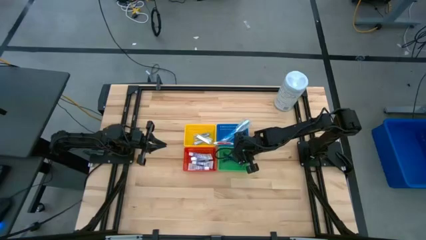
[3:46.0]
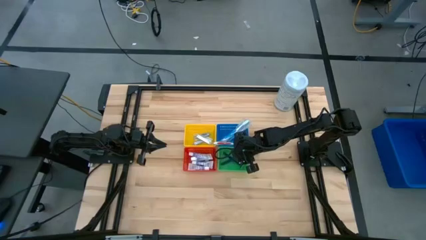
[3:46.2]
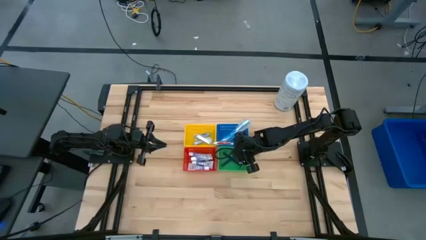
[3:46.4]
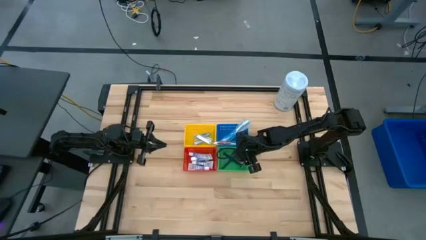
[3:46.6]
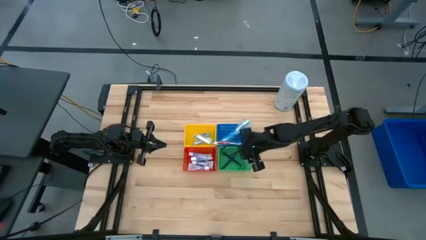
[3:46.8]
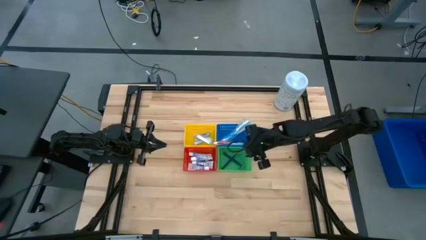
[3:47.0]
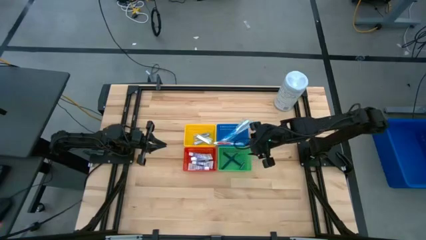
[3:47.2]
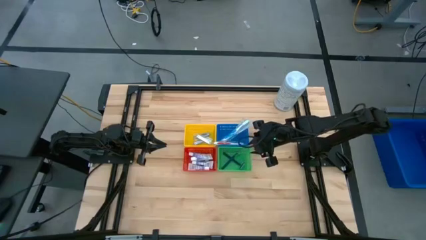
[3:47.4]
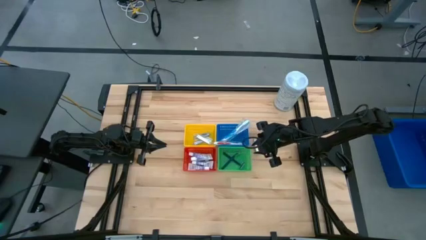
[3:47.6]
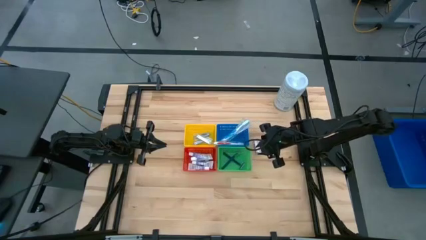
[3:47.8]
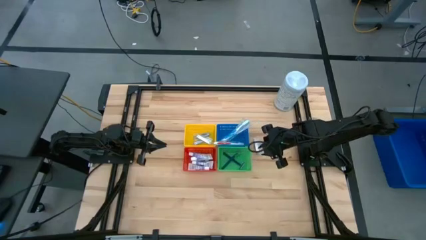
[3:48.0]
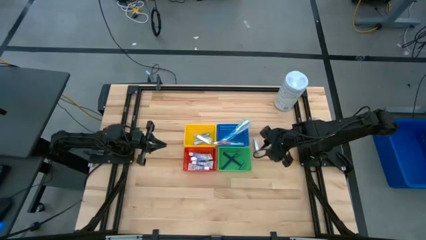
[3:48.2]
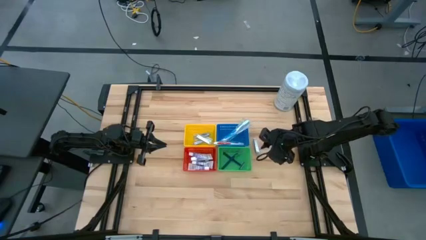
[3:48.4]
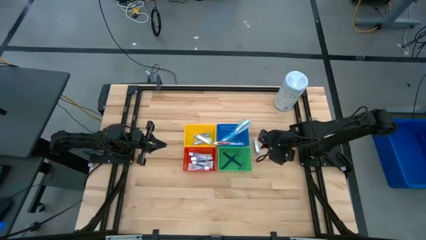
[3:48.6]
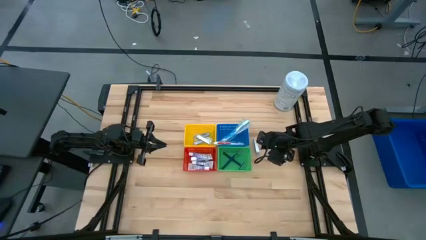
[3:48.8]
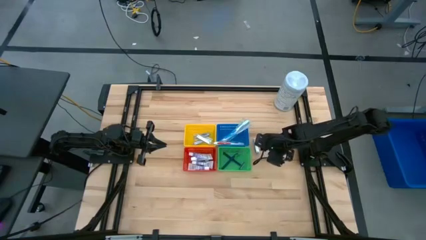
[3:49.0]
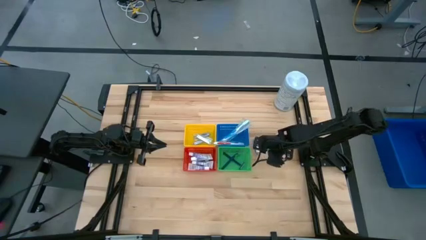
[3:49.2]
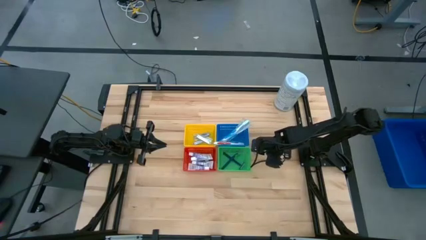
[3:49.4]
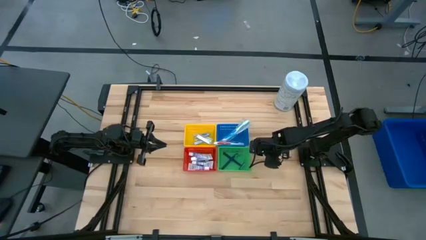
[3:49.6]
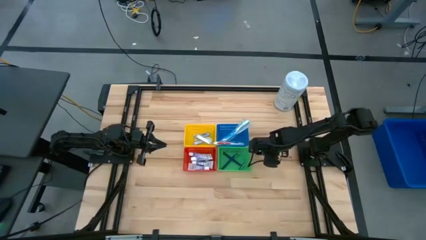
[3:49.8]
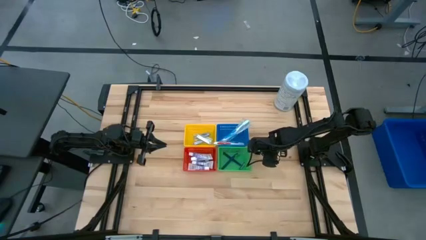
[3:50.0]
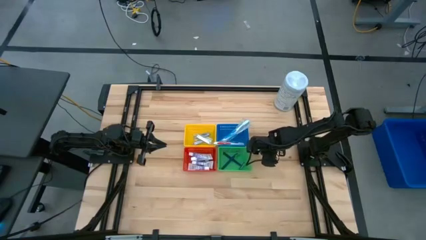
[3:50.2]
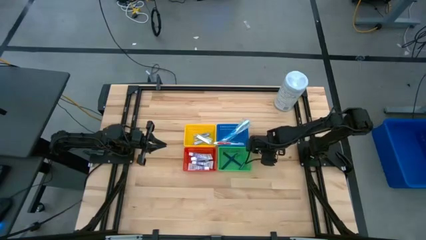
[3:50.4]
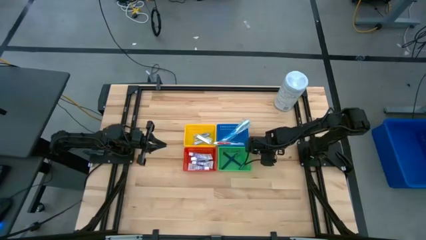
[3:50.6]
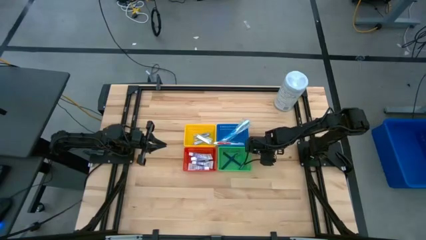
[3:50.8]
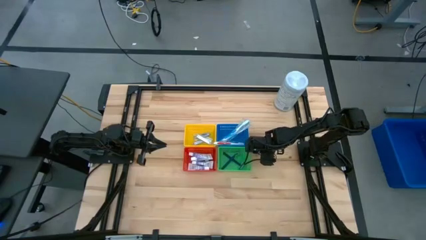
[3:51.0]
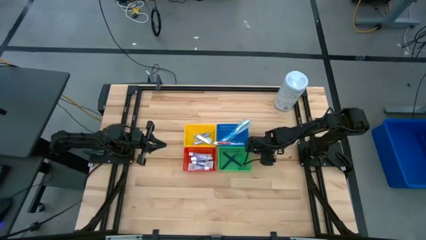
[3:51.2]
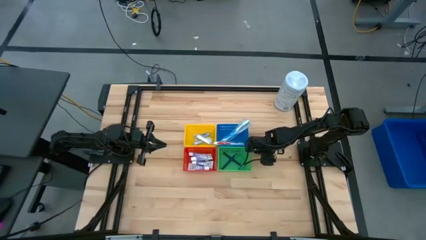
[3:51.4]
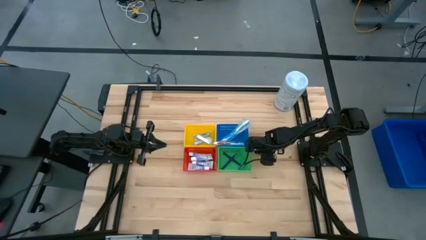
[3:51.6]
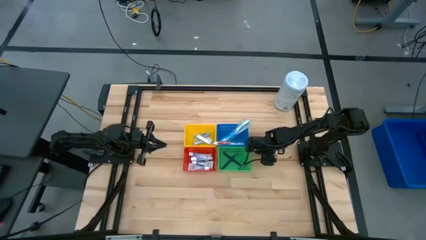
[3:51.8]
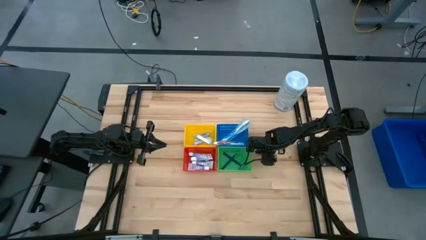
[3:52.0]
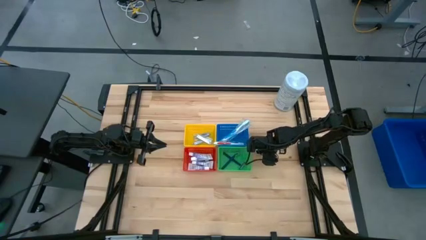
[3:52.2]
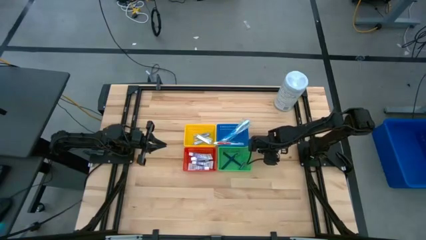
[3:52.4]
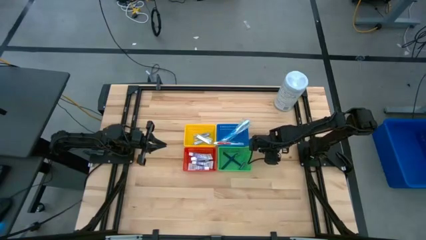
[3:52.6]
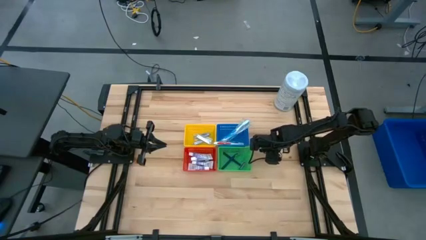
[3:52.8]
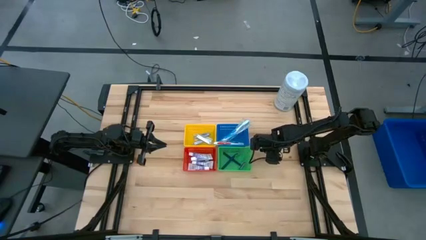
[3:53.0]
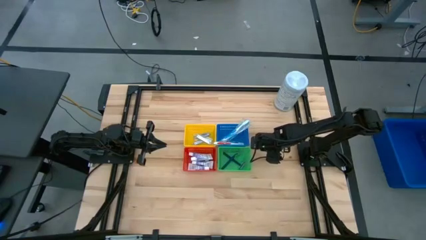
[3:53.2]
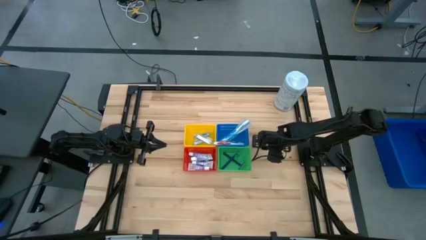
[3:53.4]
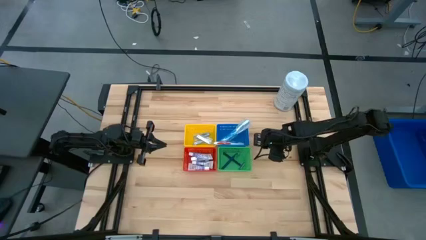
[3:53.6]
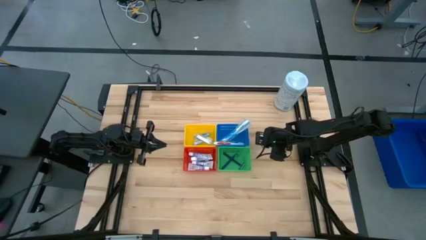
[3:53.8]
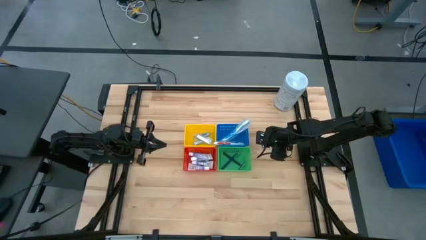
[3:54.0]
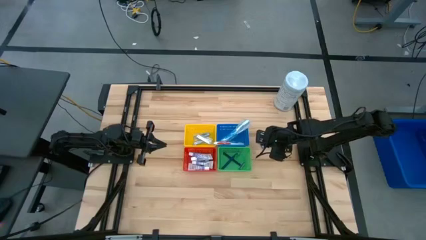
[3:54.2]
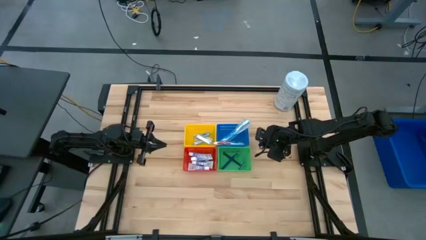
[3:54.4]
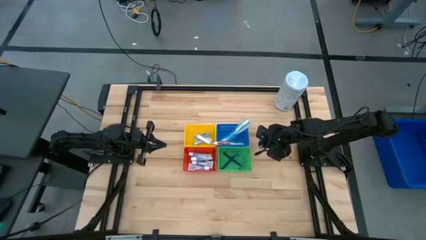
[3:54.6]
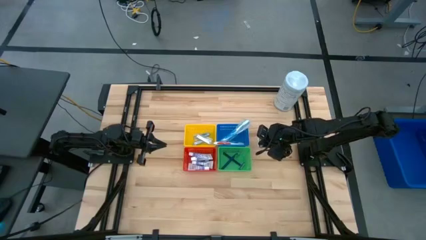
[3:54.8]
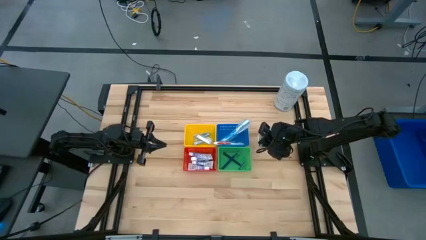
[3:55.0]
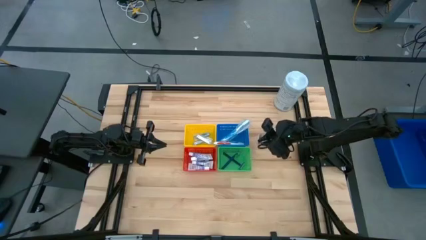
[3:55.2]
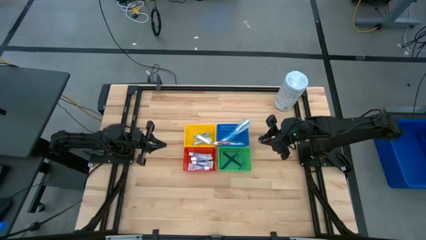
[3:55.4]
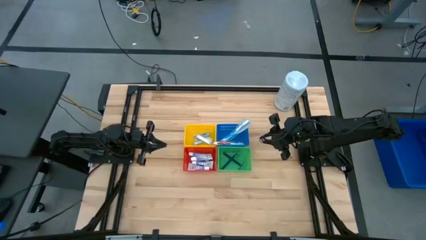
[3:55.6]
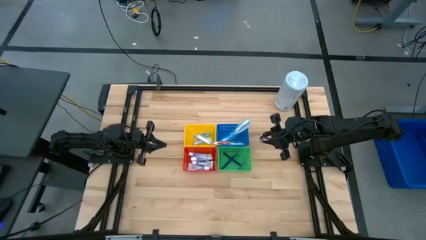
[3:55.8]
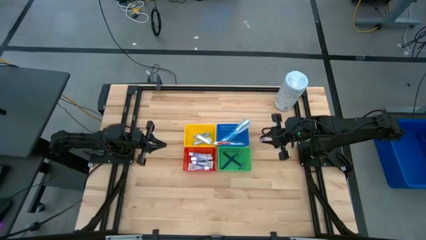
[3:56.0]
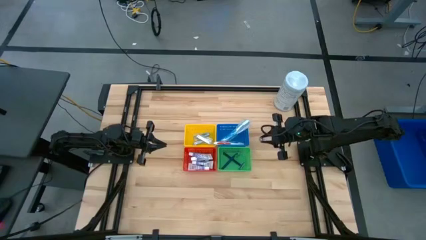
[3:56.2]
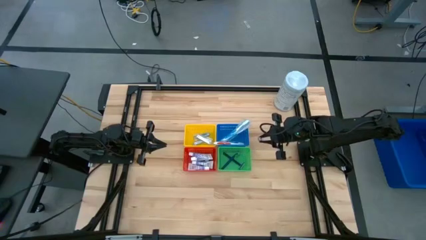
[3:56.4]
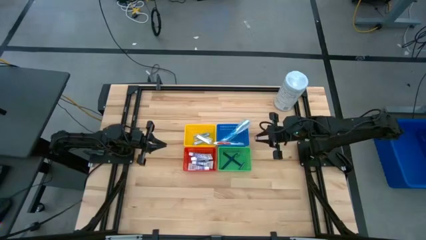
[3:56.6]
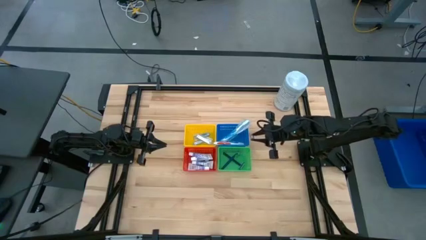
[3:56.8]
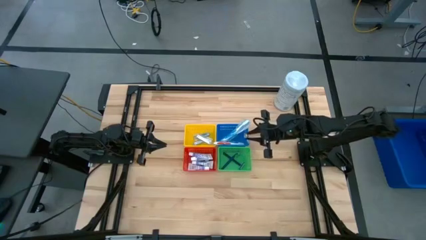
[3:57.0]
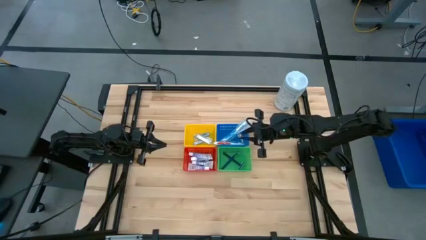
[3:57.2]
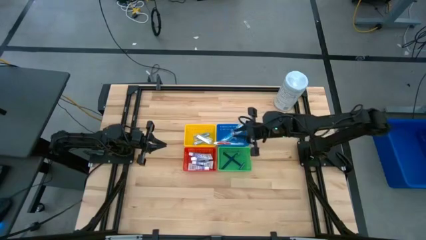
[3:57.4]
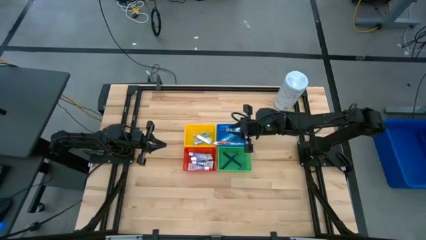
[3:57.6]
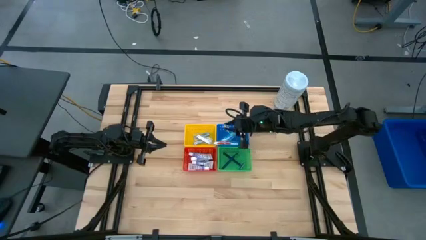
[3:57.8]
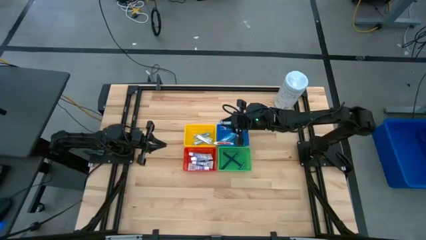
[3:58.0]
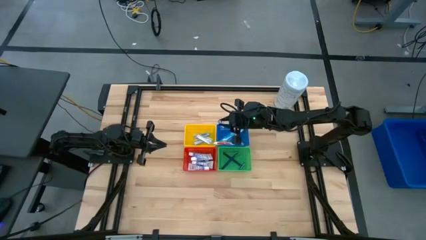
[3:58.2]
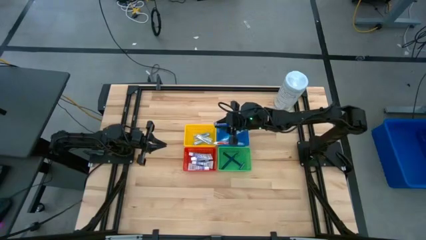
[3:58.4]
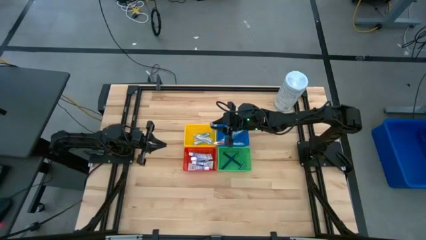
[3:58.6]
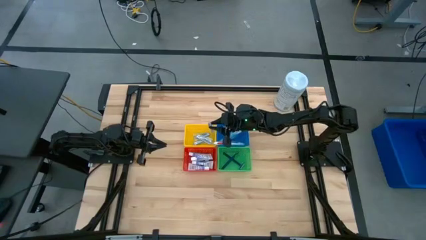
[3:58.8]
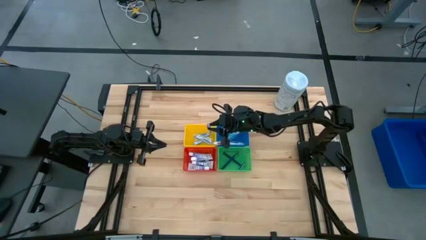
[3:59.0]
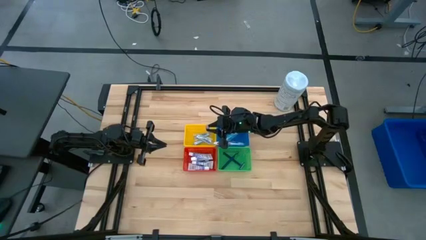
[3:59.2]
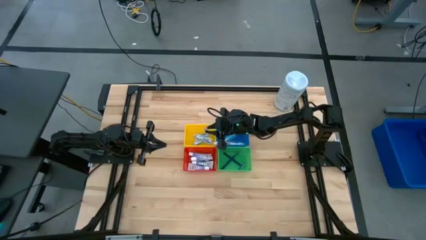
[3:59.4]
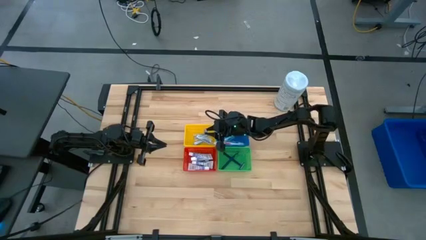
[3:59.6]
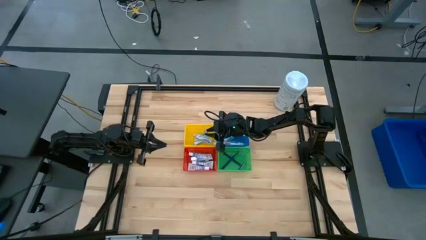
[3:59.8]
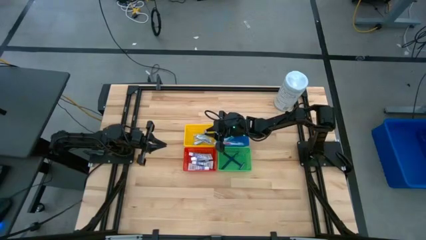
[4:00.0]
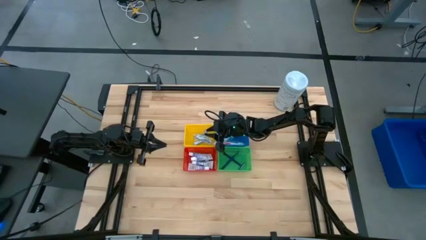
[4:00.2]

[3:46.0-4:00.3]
Task: Pick & Place Travel size toiletries
Put the nail cutter into the yellow bin
